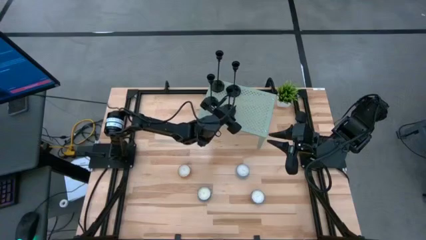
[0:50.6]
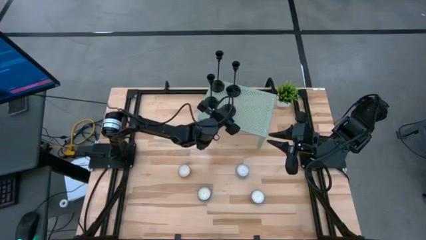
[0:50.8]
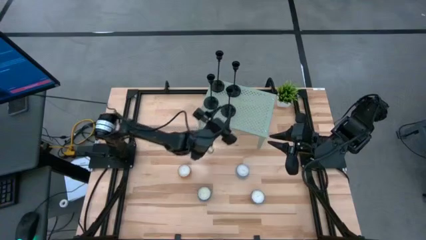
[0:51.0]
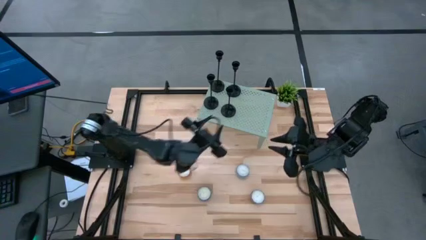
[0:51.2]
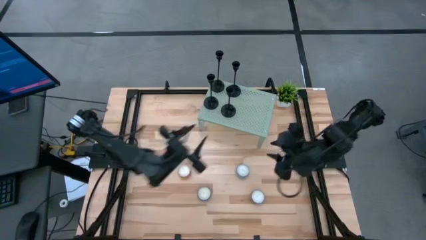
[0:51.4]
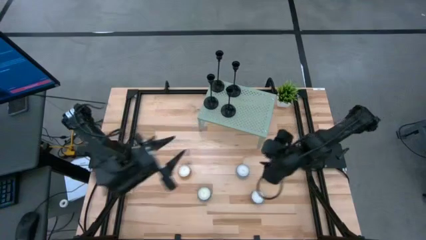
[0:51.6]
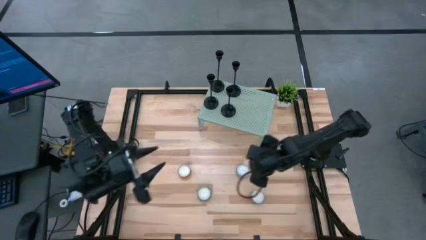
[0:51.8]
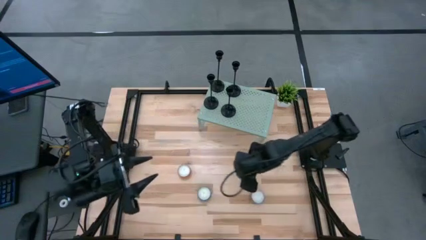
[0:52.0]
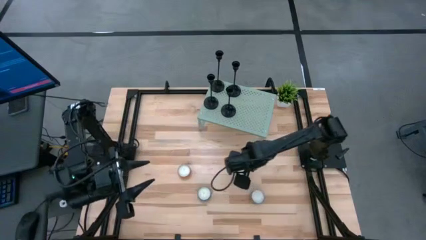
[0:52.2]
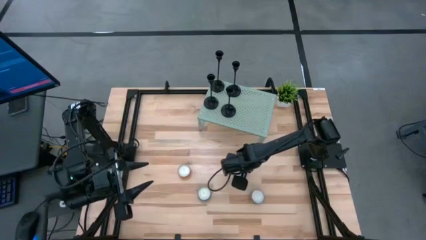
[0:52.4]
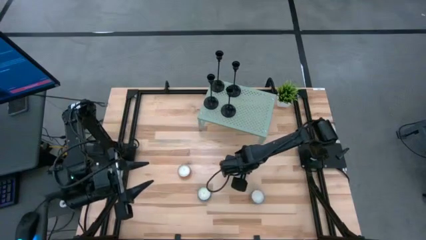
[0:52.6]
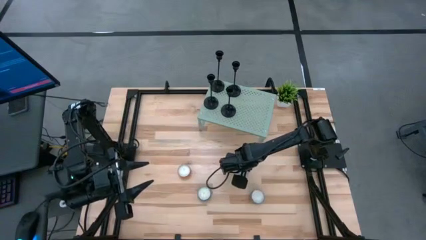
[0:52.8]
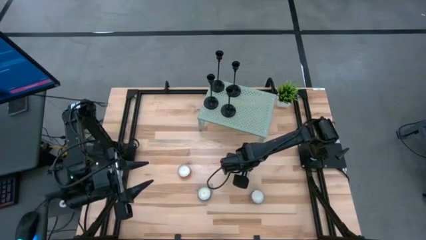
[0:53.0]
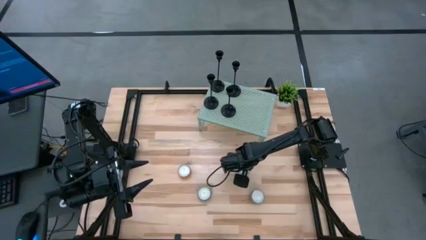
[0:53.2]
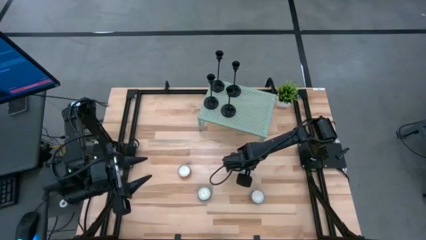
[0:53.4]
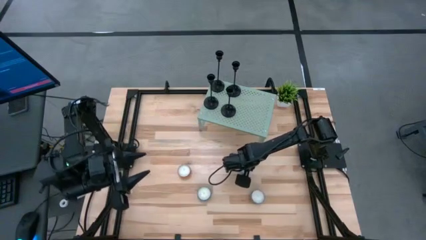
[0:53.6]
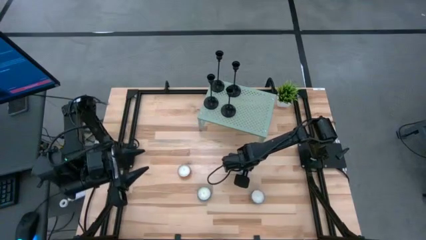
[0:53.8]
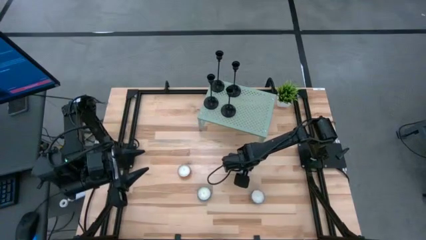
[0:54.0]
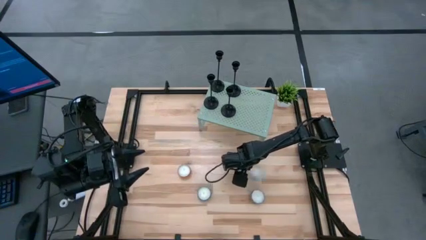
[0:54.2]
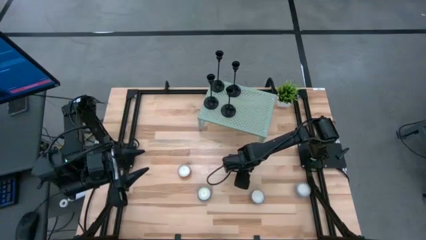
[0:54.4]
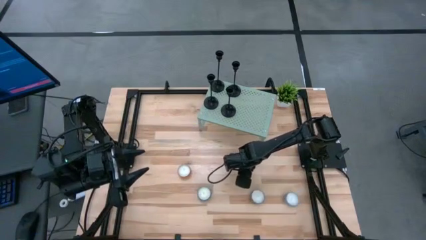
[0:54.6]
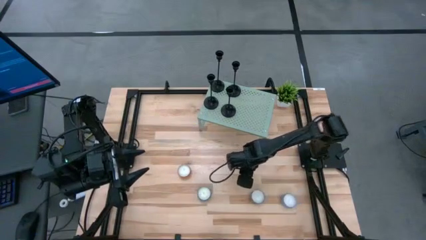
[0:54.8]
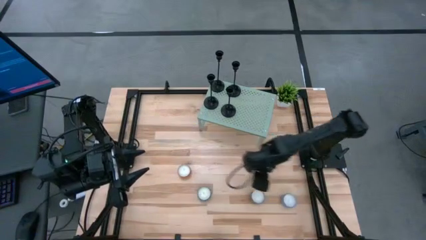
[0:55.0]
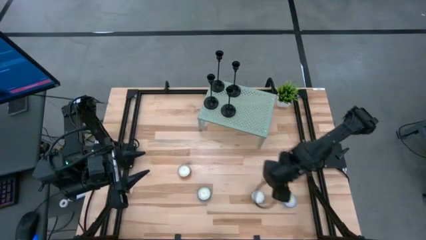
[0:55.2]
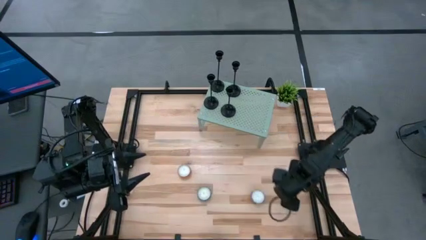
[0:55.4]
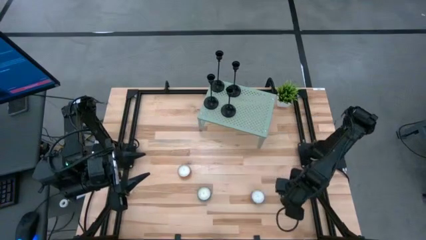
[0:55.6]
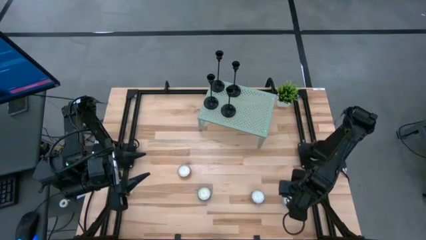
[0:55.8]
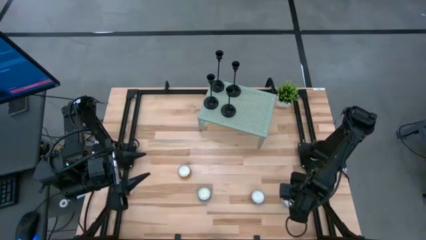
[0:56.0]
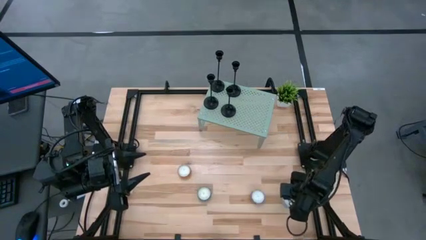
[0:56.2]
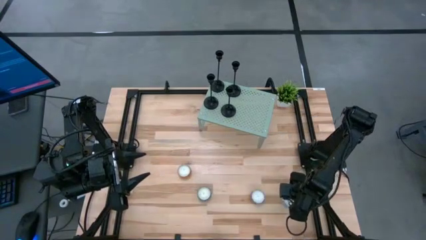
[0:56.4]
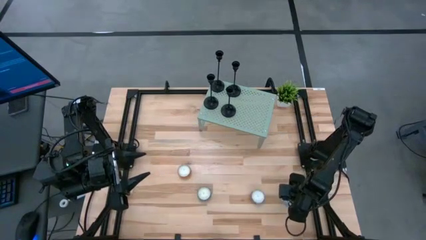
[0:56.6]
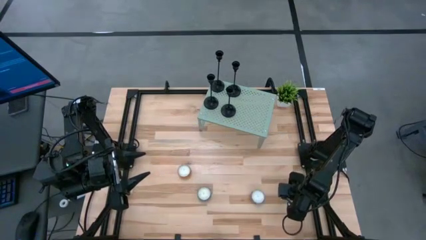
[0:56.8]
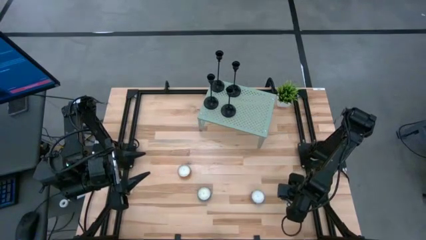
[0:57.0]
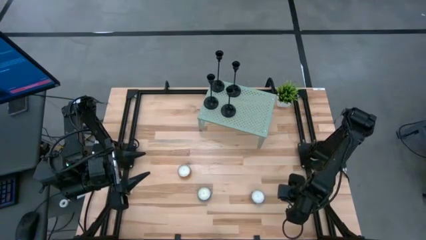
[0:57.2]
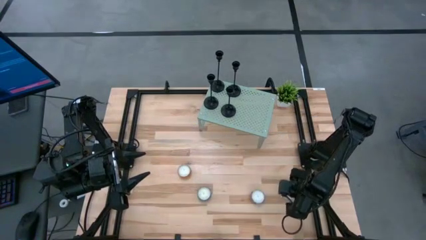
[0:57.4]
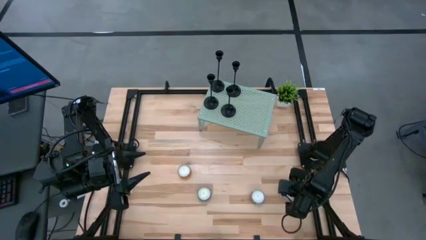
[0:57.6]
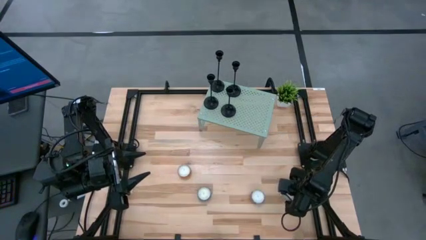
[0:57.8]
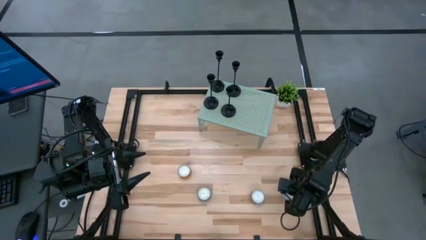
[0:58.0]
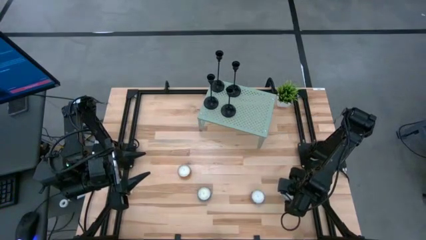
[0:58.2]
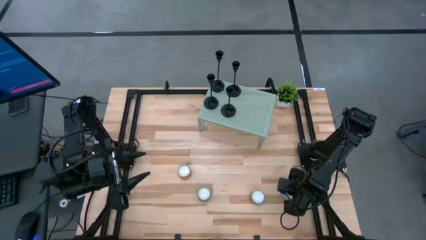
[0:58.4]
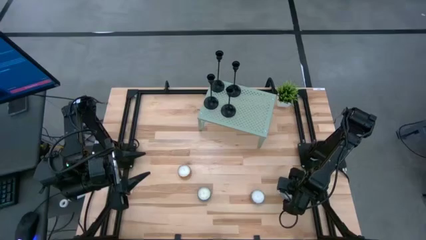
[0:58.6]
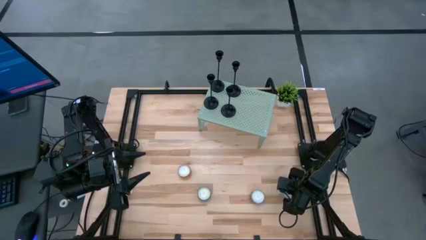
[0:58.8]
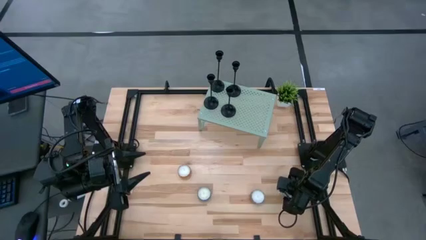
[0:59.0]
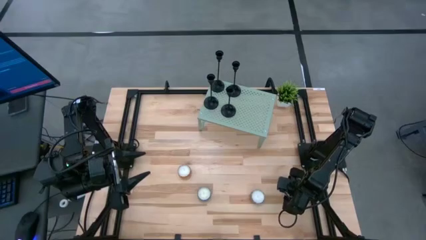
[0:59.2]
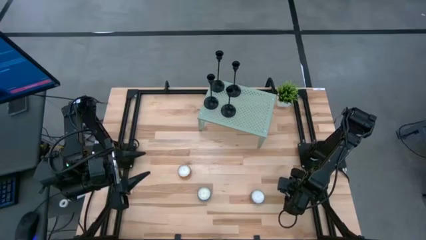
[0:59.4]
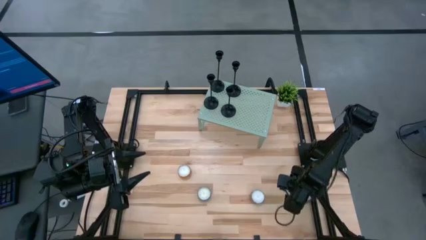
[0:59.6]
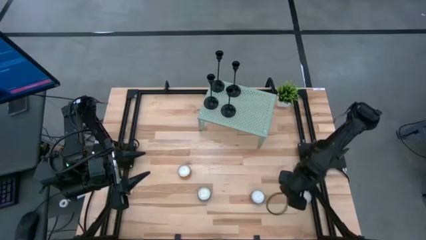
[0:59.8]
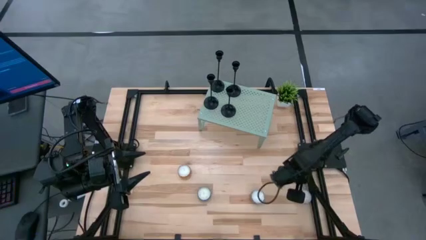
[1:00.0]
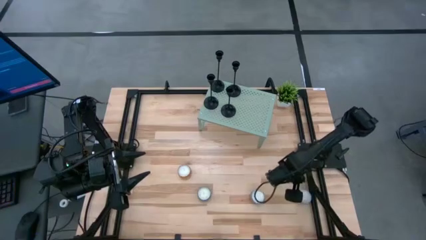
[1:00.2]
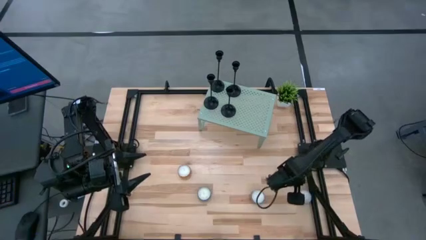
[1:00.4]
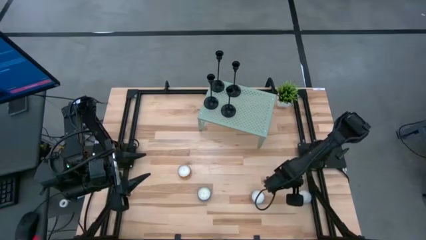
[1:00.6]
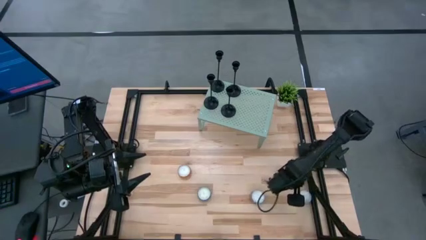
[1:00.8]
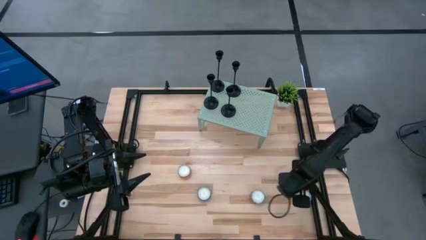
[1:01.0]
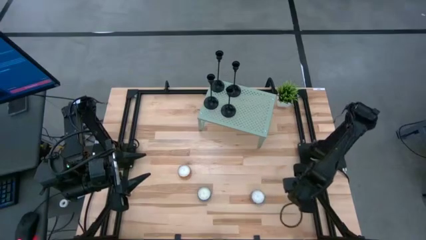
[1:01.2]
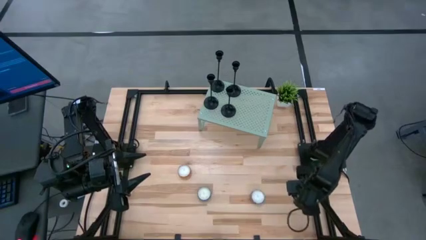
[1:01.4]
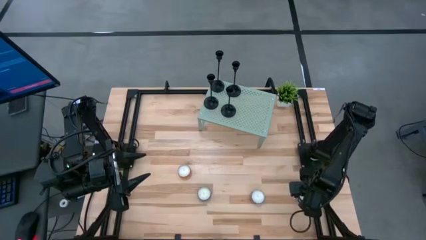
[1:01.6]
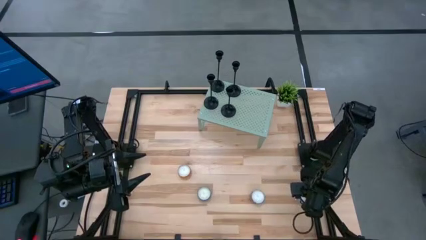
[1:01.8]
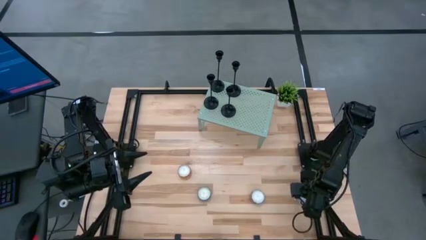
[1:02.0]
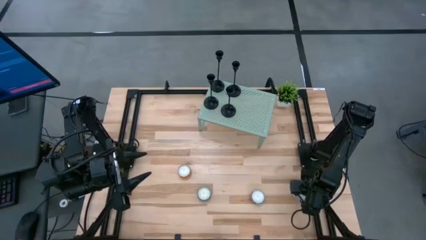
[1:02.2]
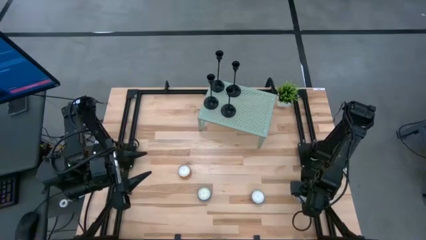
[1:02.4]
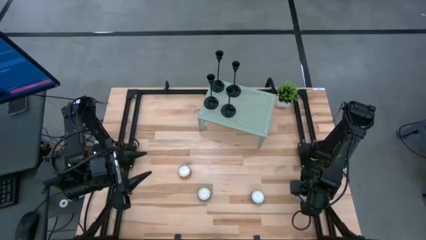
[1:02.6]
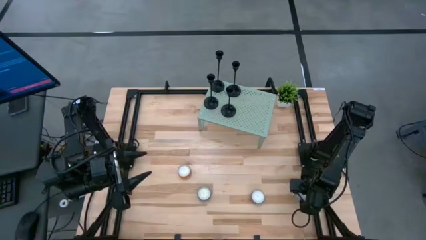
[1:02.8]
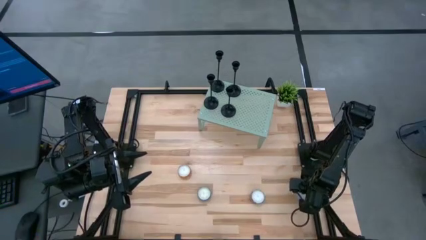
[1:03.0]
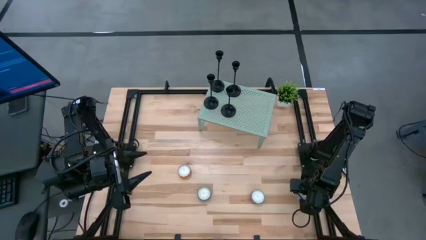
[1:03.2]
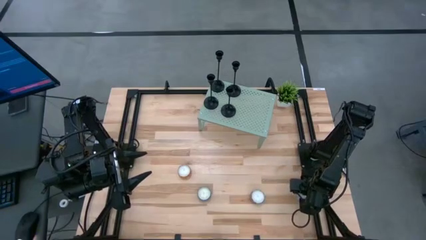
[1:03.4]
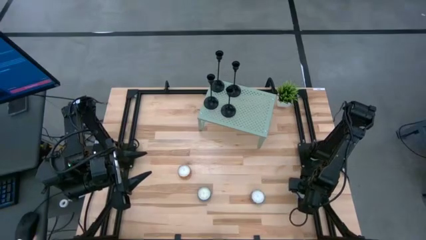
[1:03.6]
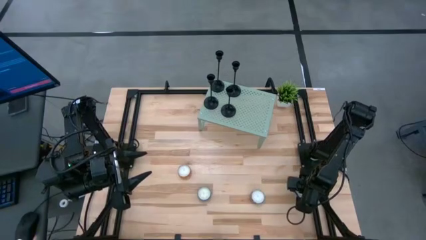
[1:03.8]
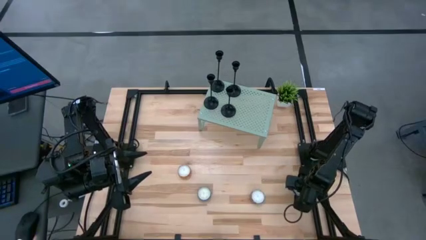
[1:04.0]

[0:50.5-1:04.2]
Task: Pick & Place candle stick holders
Put the light blue scented candle on the shelf

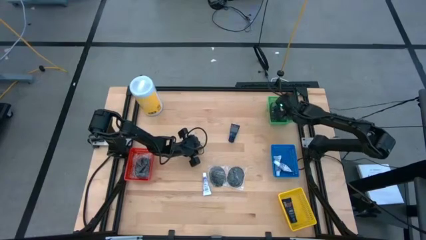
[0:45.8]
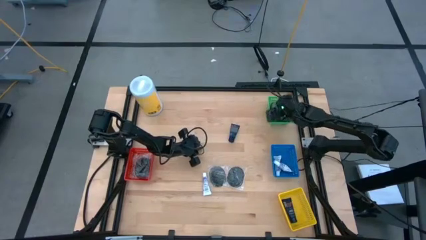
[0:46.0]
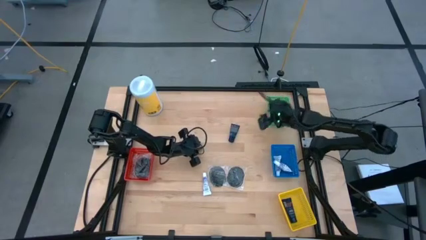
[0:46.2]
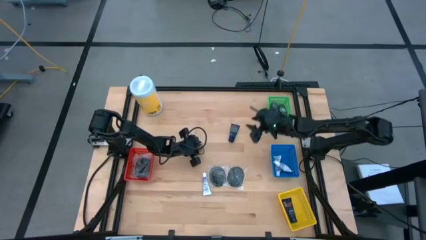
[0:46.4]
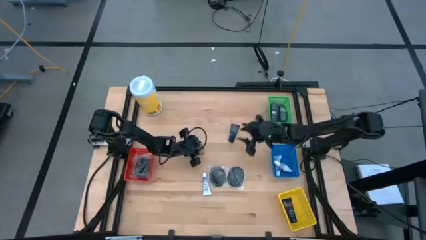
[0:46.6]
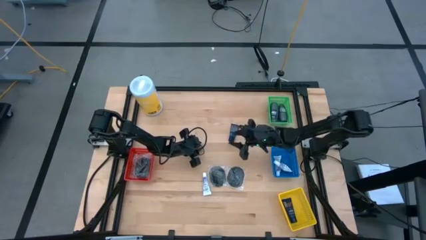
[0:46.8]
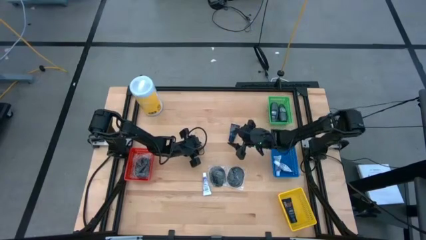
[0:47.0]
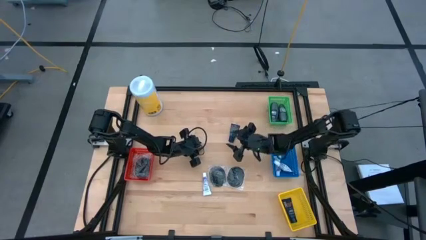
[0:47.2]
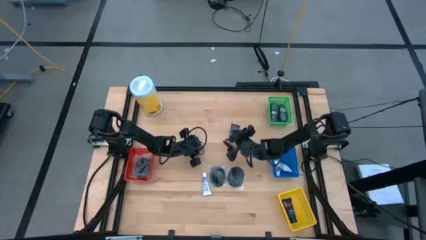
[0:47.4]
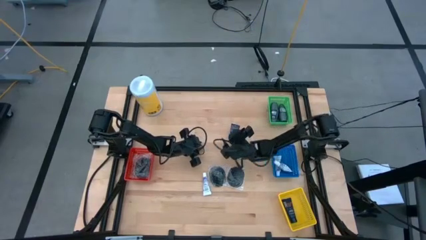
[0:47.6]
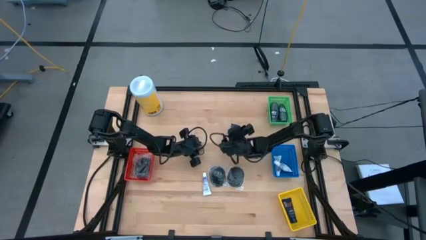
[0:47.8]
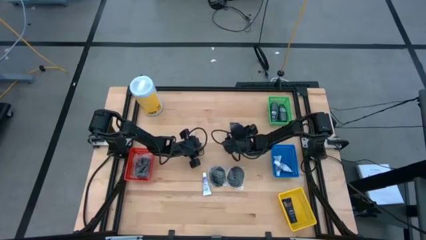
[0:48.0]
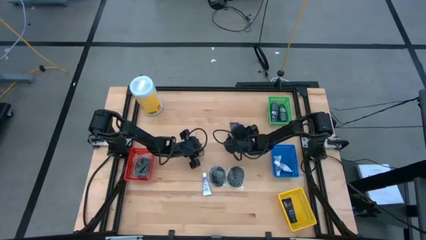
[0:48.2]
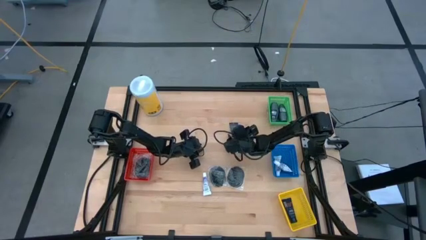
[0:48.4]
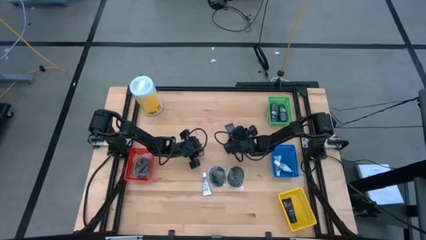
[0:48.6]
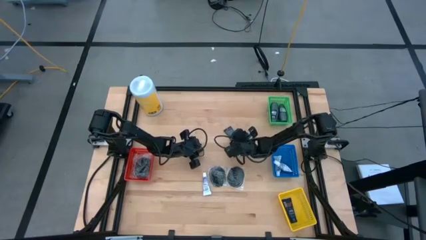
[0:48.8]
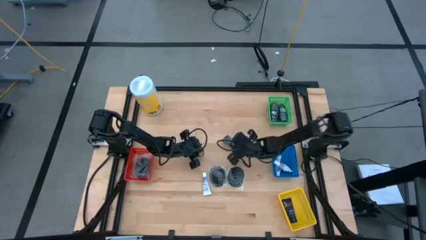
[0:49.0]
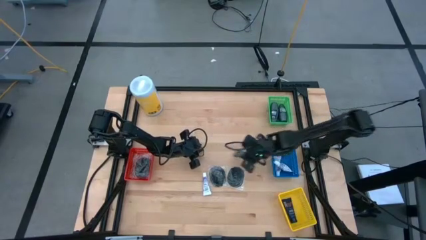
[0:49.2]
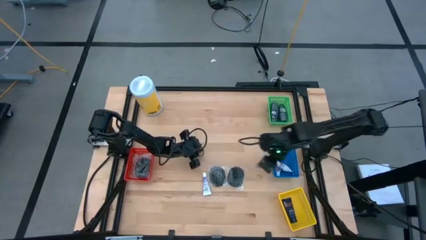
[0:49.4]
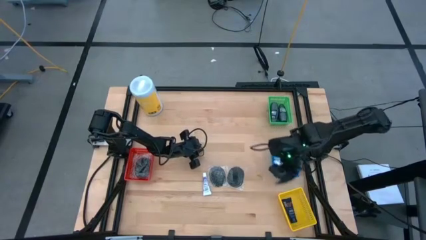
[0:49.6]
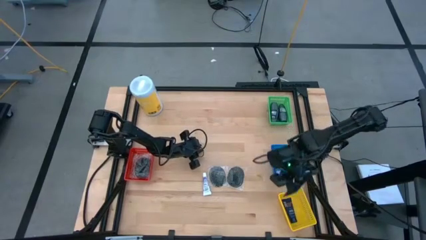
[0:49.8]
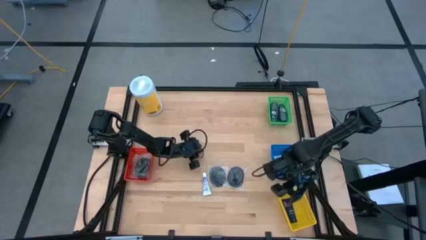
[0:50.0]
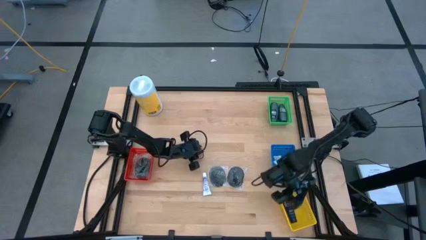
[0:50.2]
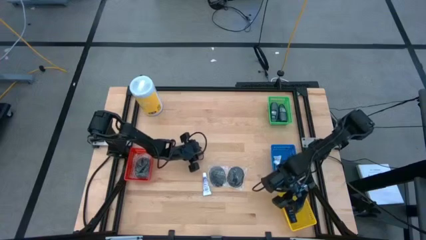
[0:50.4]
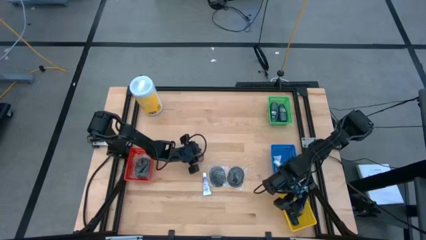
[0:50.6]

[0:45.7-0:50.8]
Task: Pick & Place Travel size toiletries
Put the shave cream into the yellow bin
